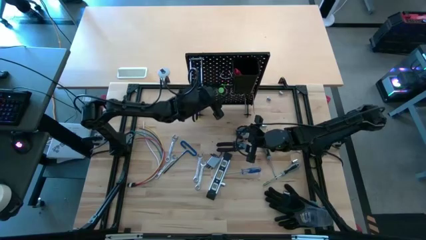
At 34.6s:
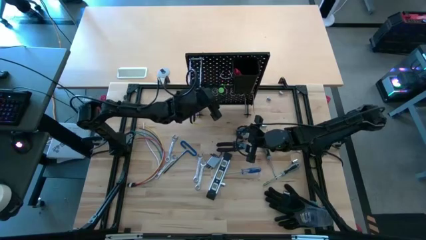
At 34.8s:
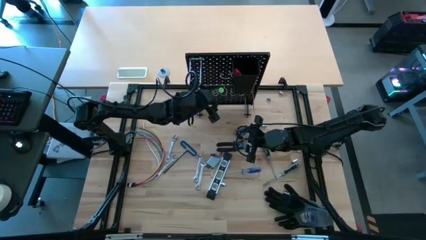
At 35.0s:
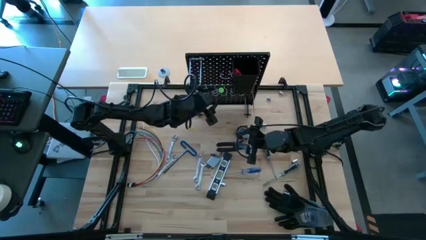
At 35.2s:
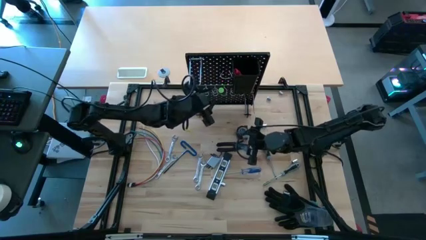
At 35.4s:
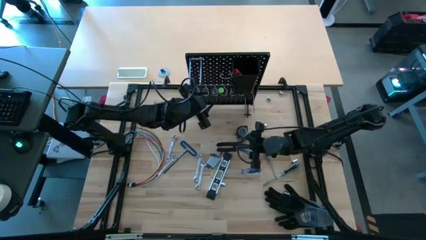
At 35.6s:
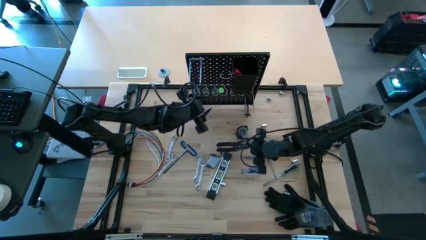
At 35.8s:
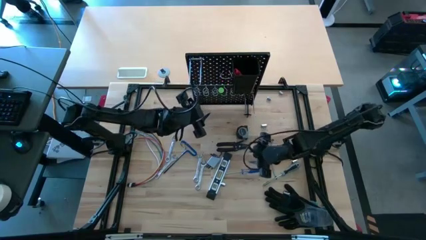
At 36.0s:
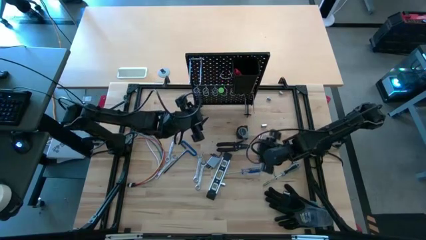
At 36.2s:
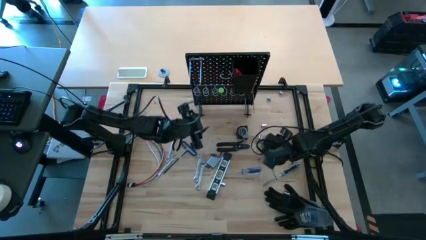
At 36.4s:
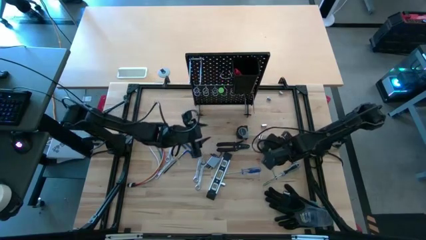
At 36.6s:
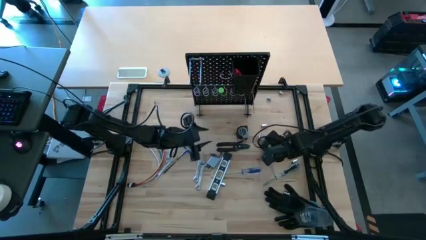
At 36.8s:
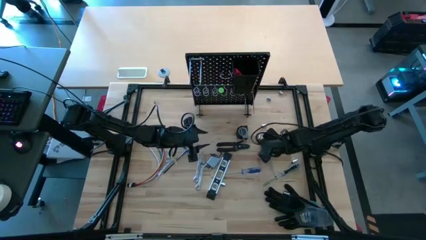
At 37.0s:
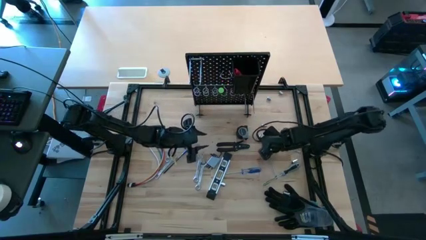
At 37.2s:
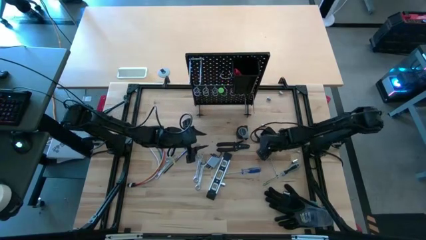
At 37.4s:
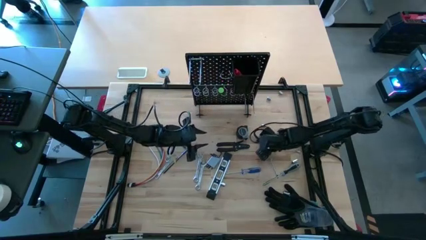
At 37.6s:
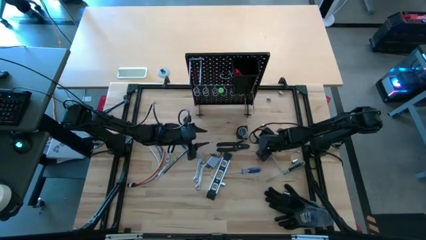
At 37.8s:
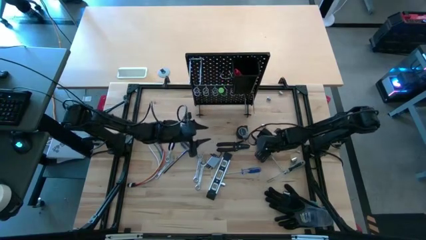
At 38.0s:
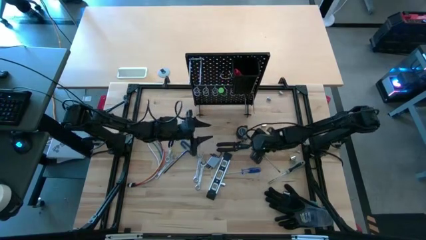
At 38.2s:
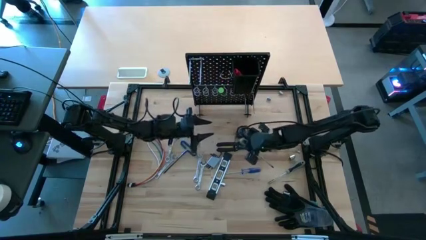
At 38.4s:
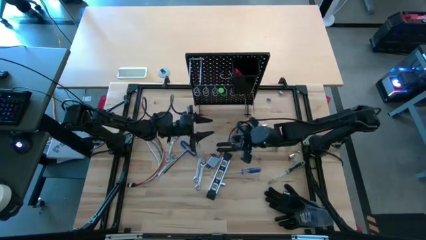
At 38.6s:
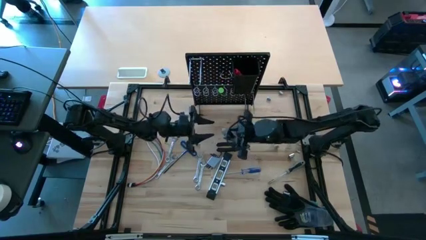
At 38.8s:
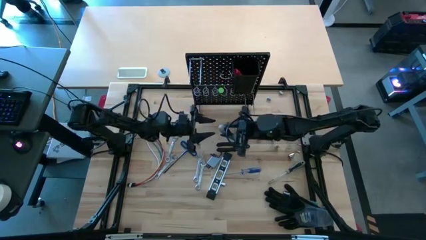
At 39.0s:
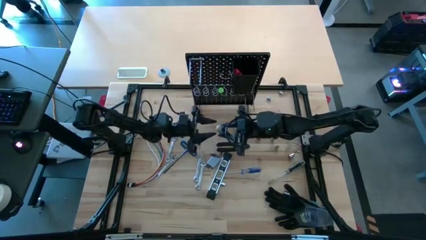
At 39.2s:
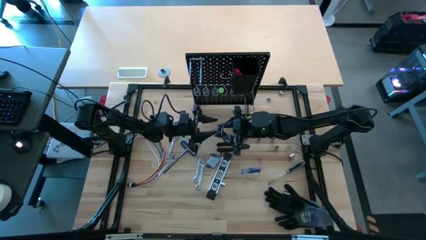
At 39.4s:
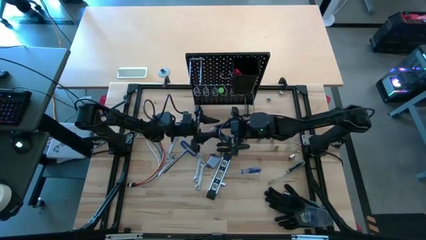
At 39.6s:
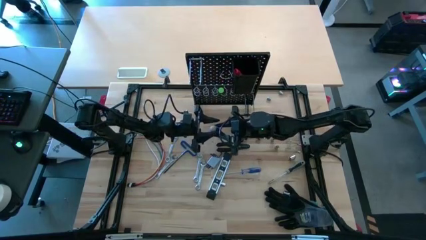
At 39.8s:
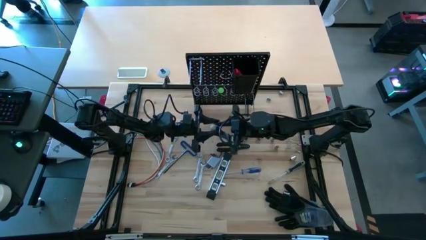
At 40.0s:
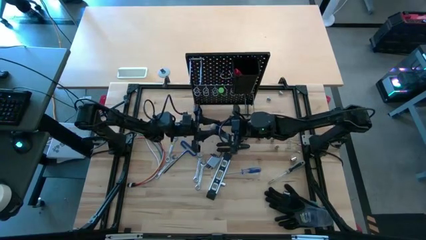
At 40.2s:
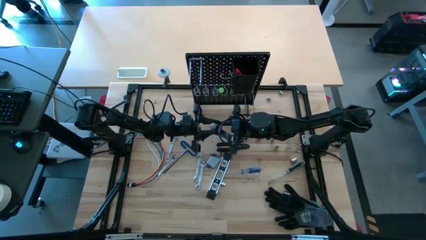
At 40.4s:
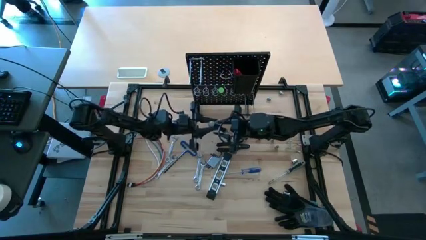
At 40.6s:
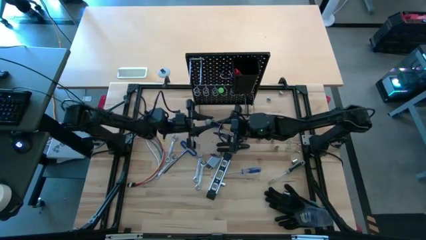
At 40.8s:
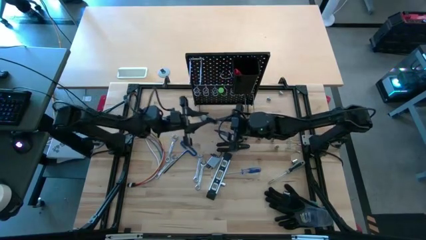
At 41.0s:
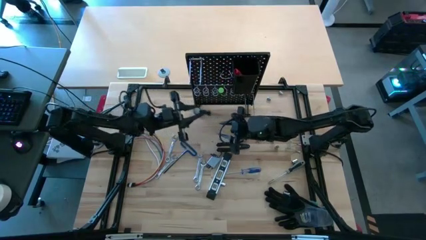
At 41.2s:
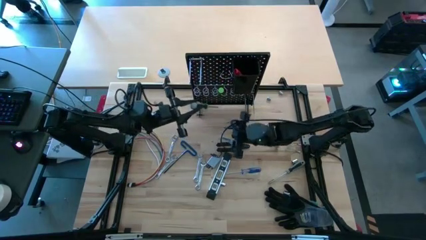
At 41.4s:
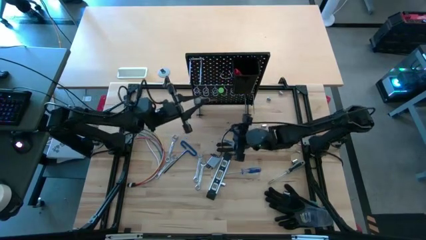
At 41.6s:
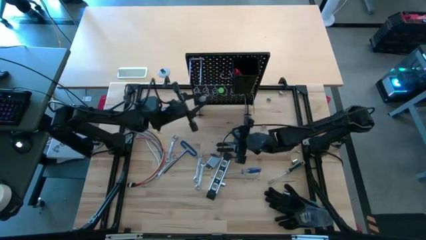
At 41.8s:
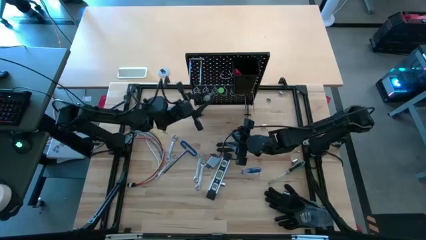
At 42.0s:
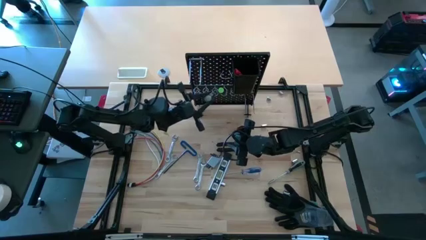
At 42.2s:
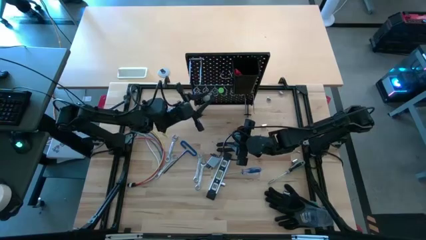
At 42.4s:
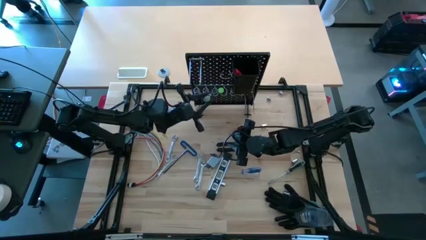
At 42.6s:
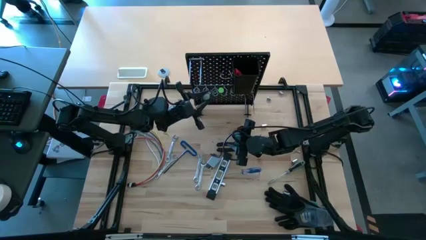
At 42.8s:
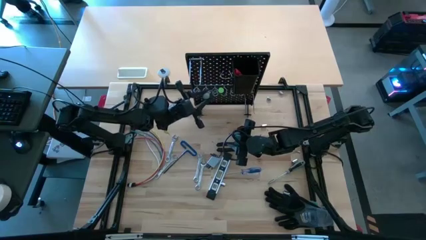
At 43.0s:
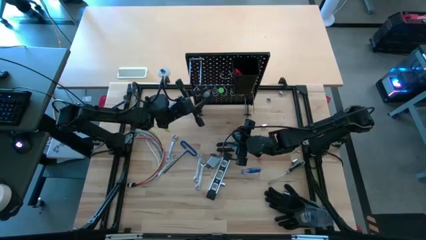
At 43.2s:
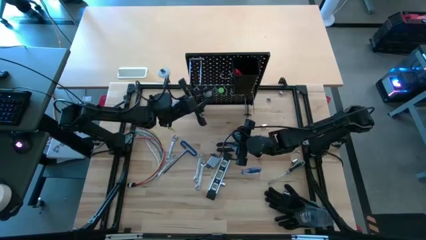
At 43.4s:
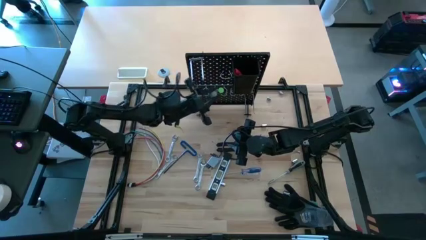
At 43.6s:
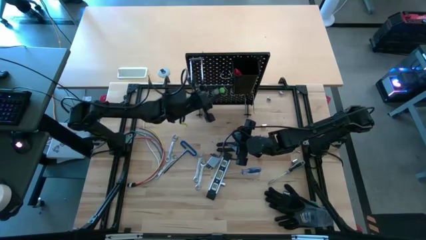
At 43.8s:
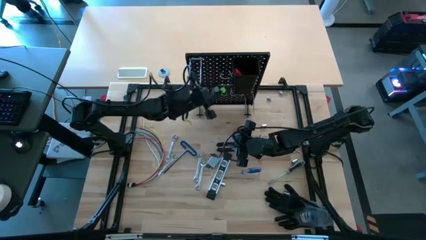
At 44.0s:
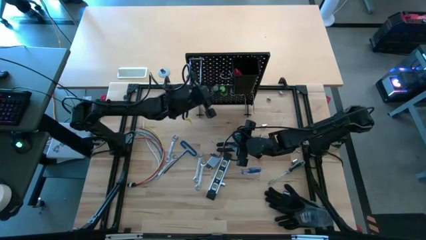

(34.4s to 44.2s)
Task: Hang tools onto peg board
Hang the gray screwdriver on the peg board
